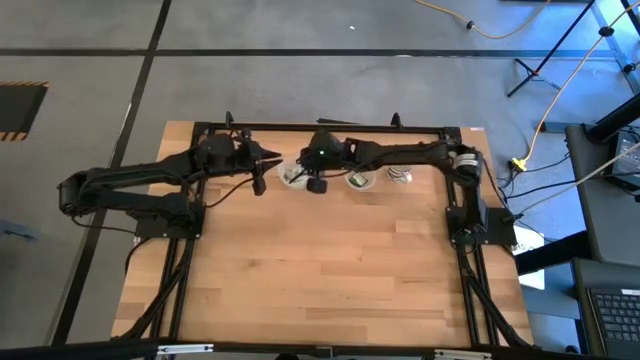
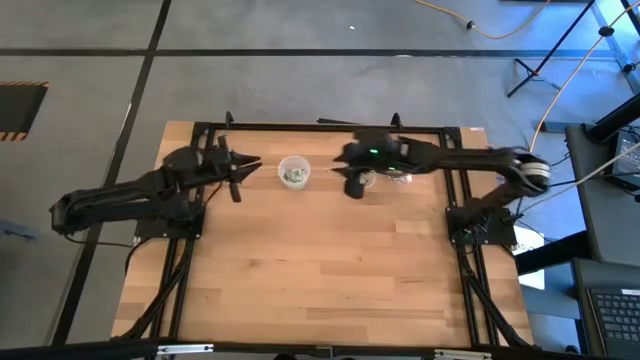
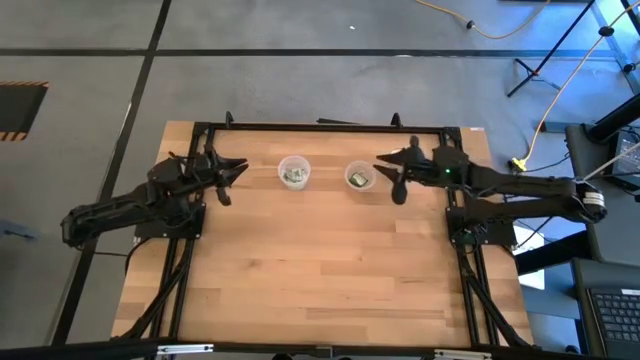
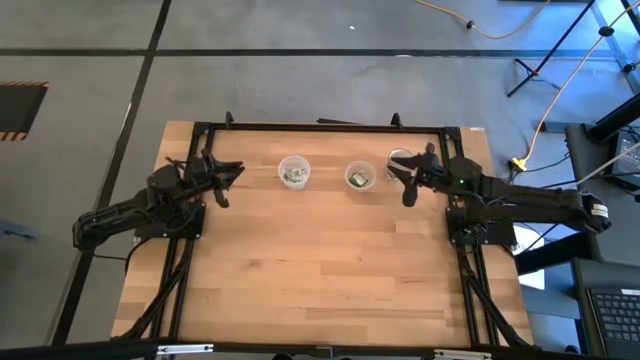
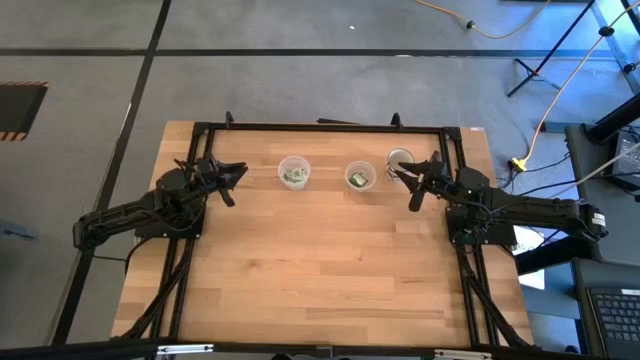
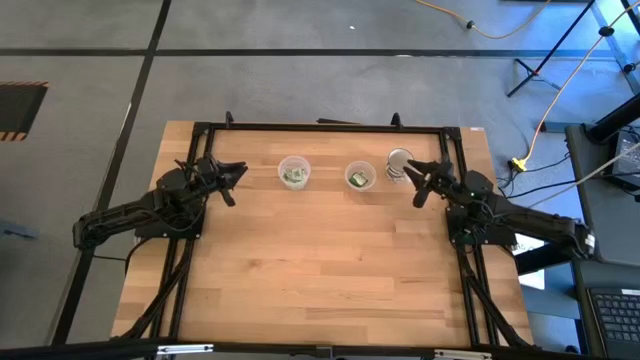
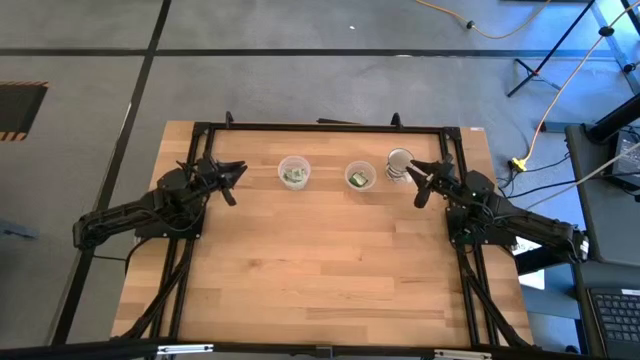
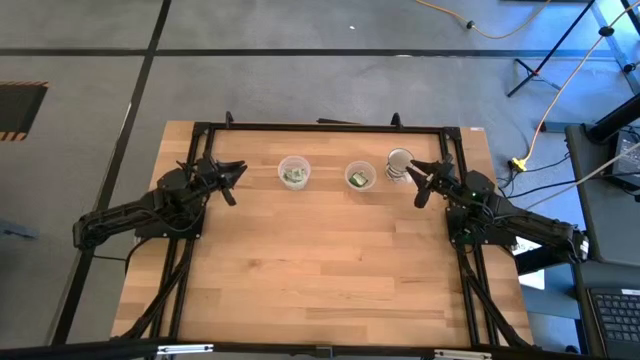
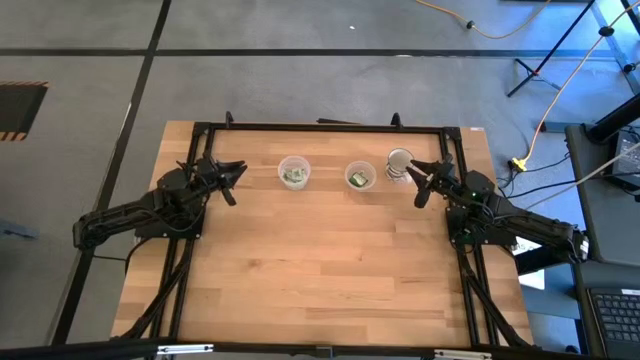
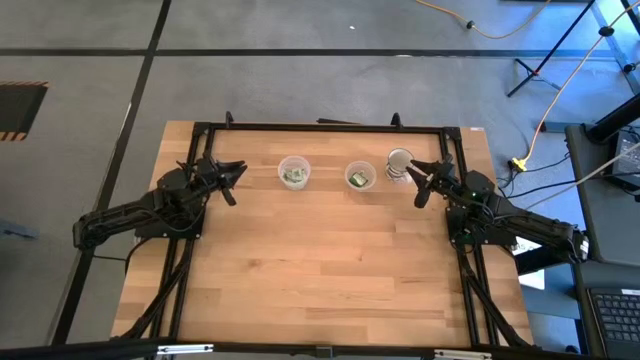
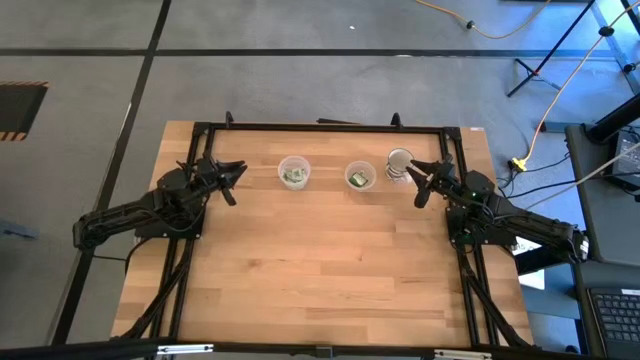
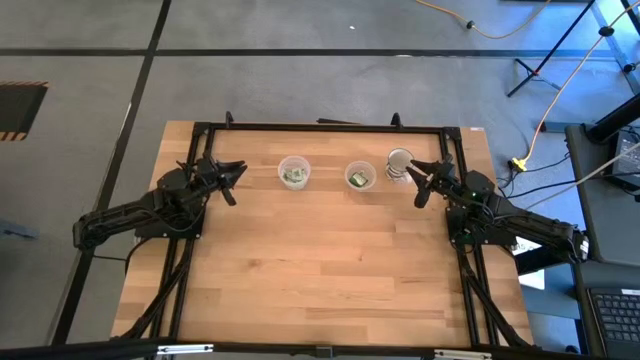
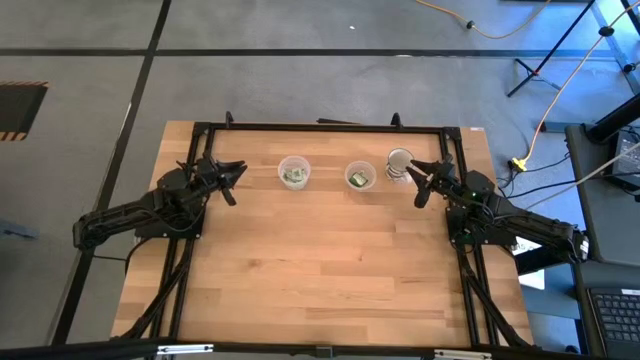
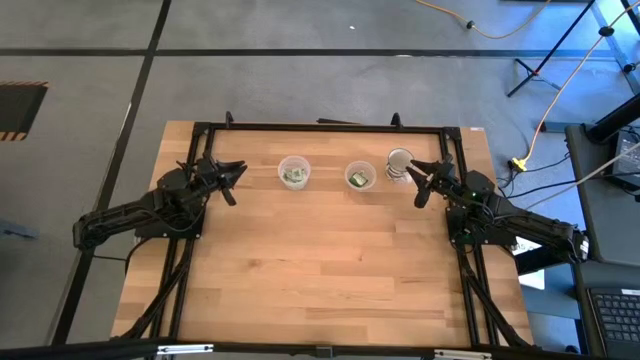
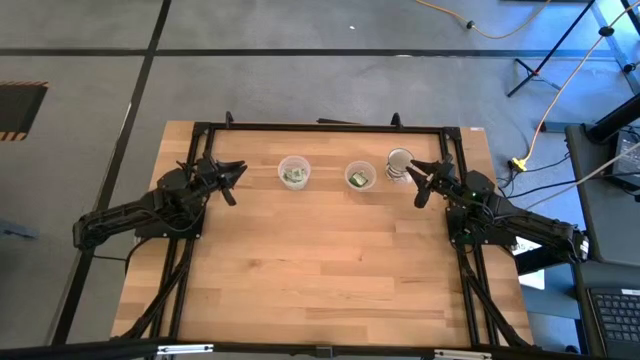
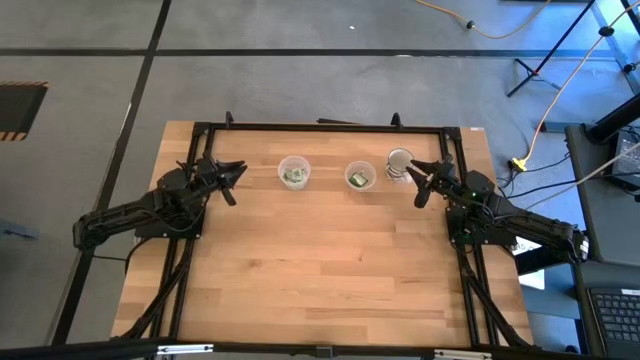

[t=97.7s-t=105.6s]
Task: Pick and place Stevia / Truvia into bins
Return to Home Position

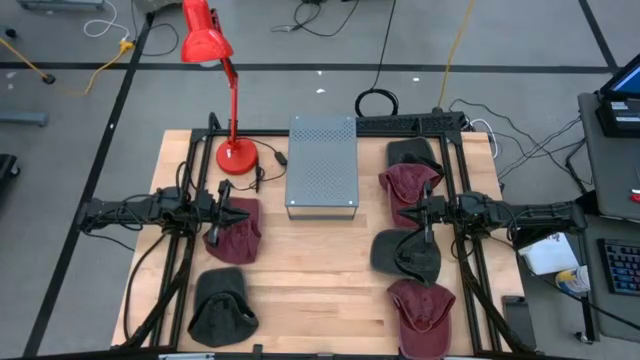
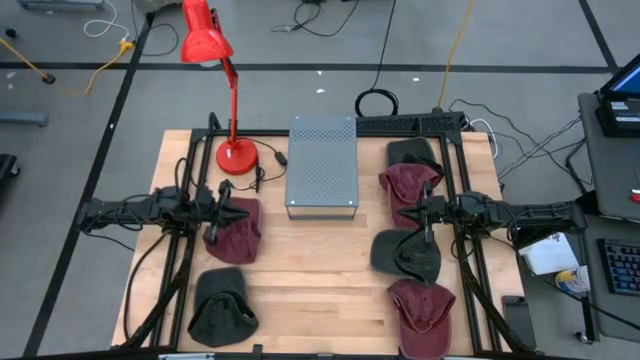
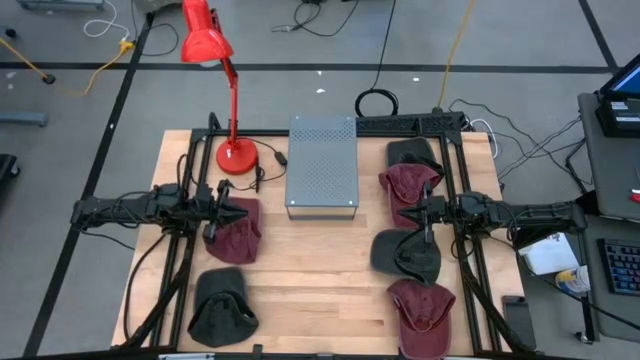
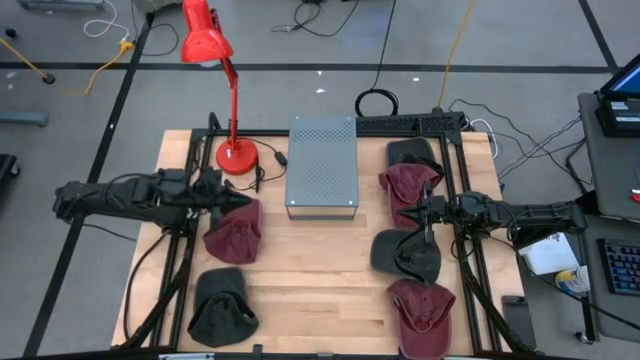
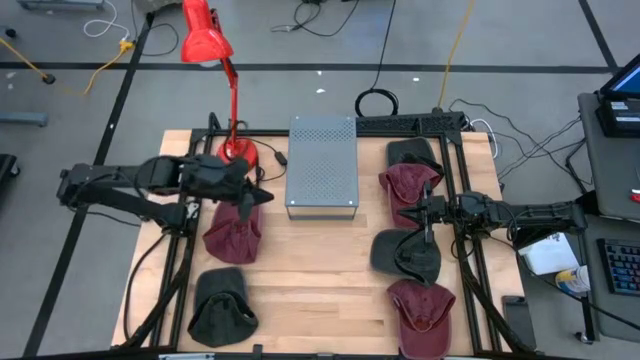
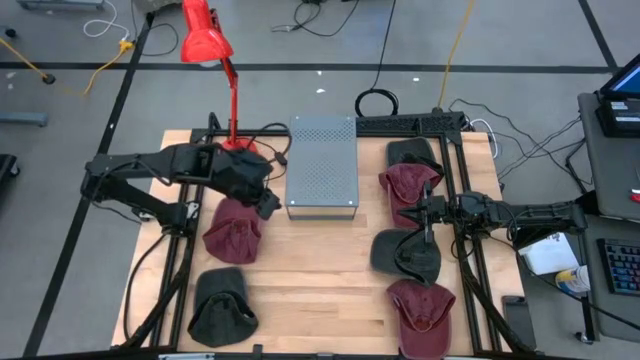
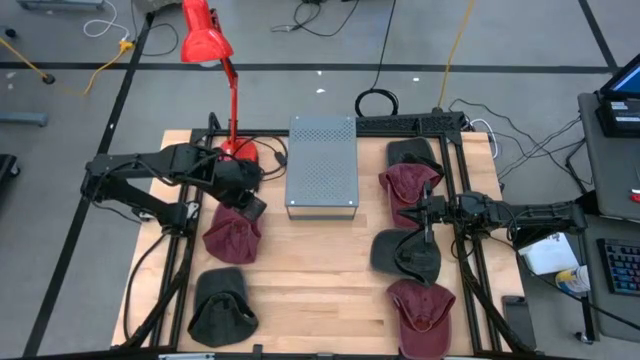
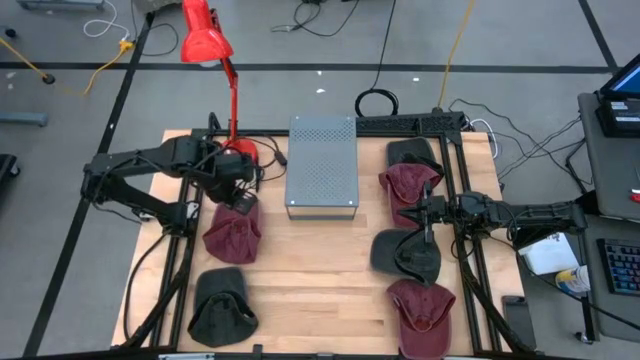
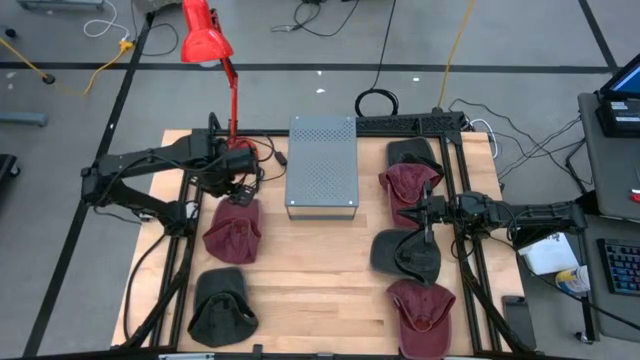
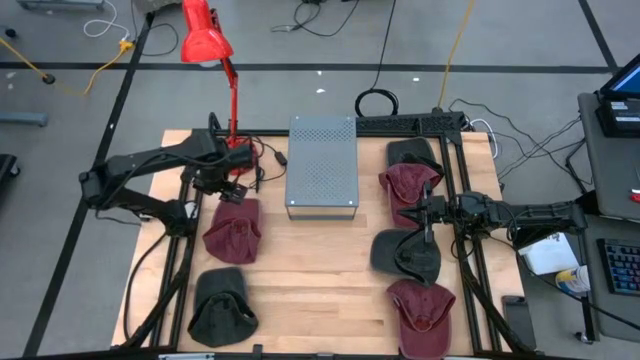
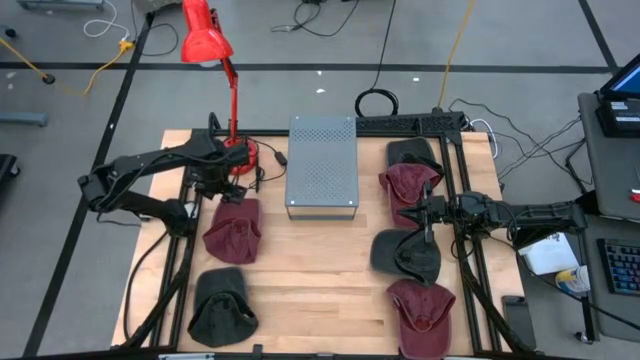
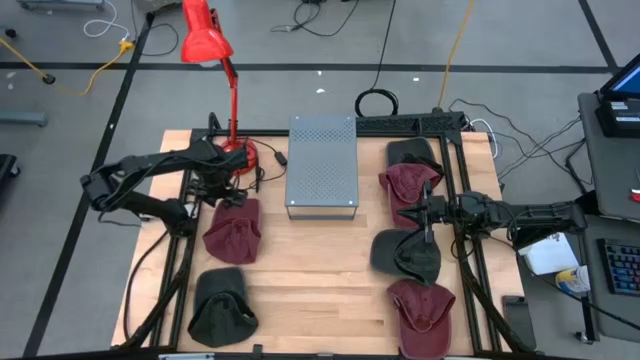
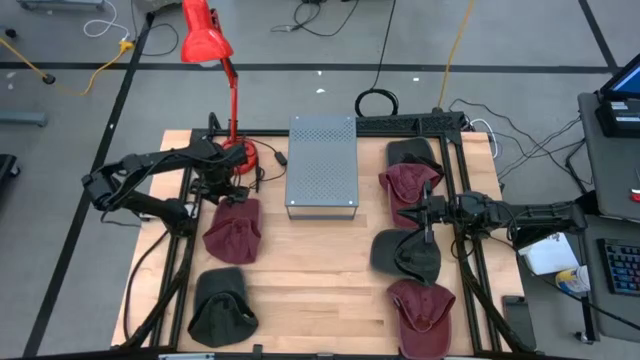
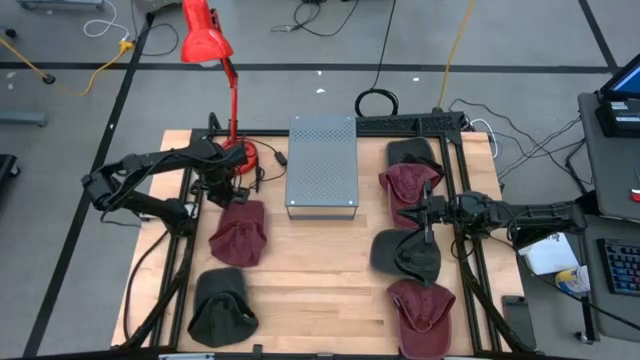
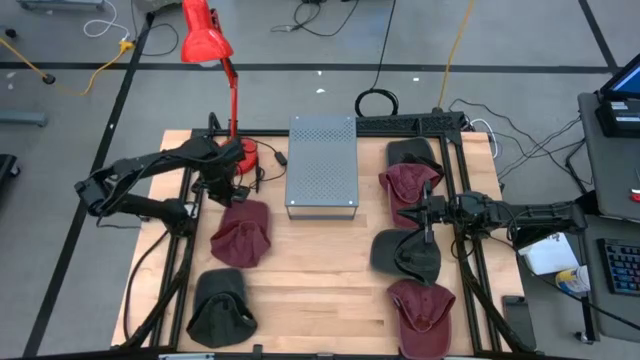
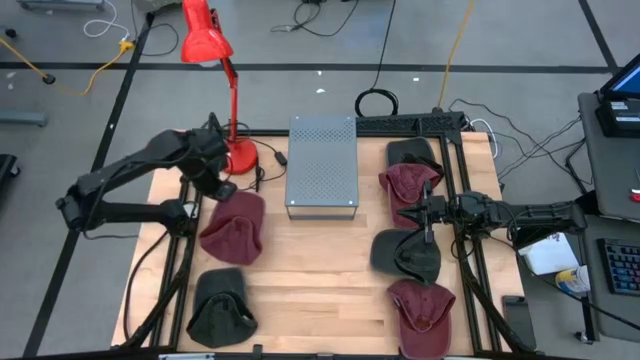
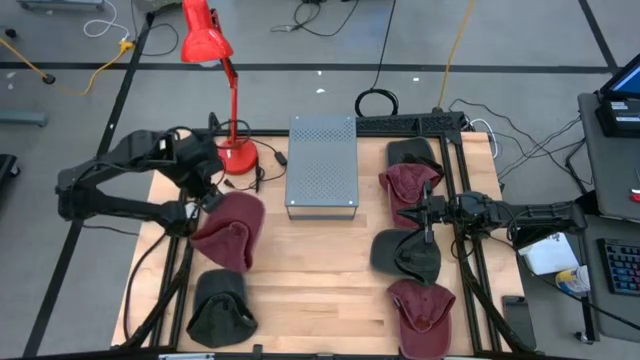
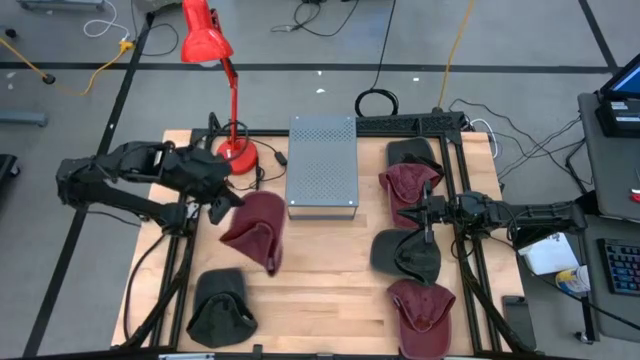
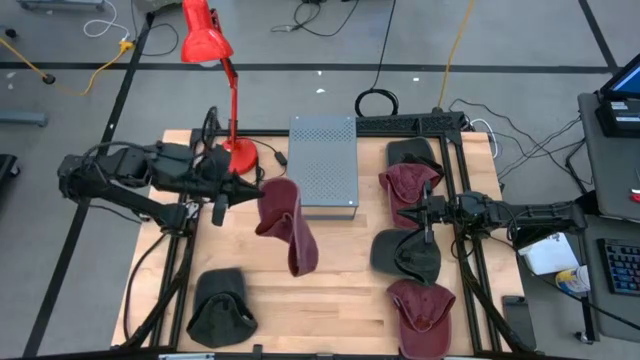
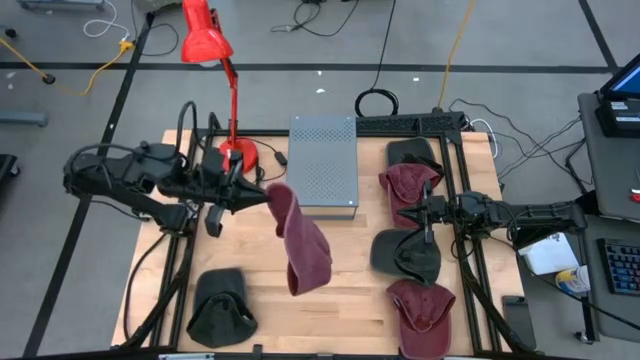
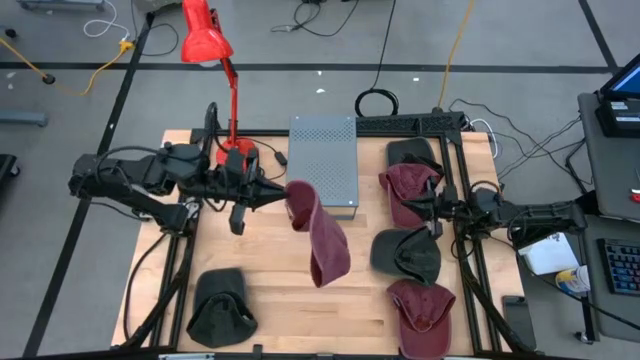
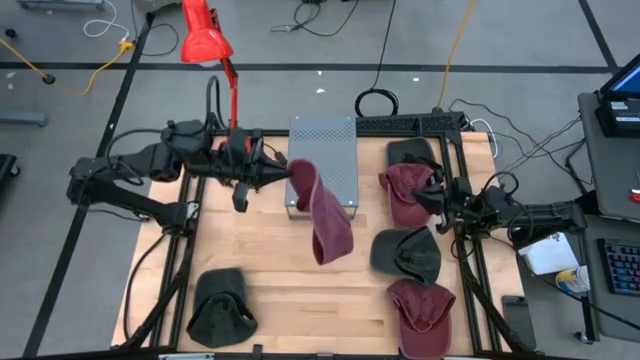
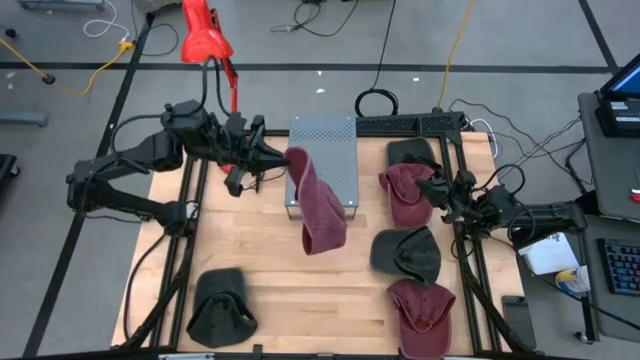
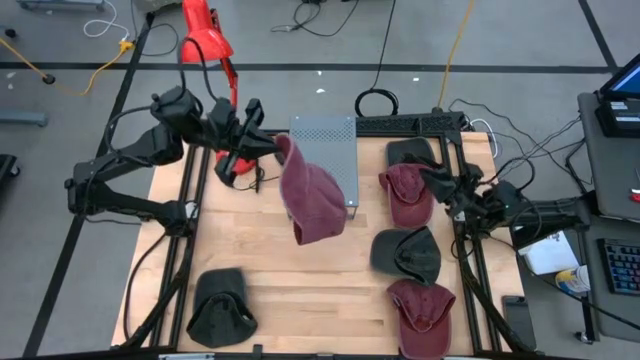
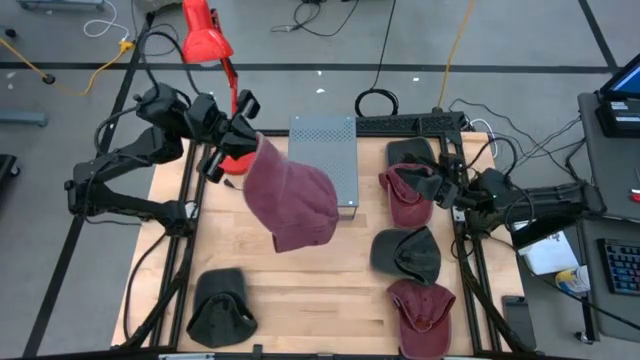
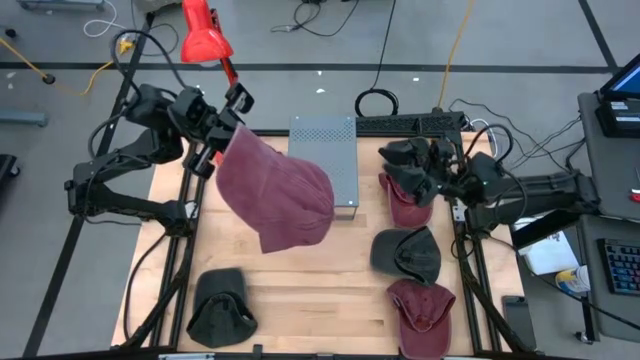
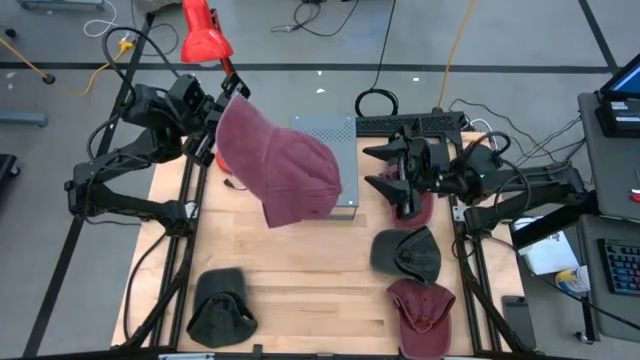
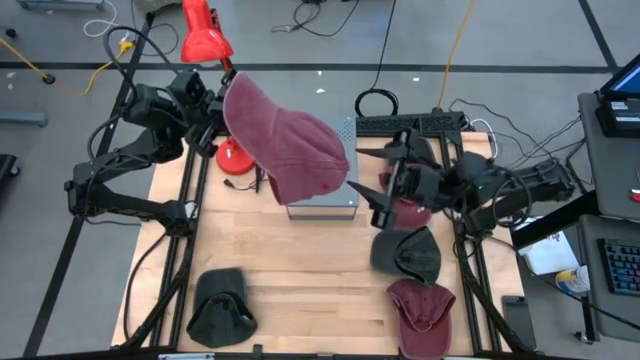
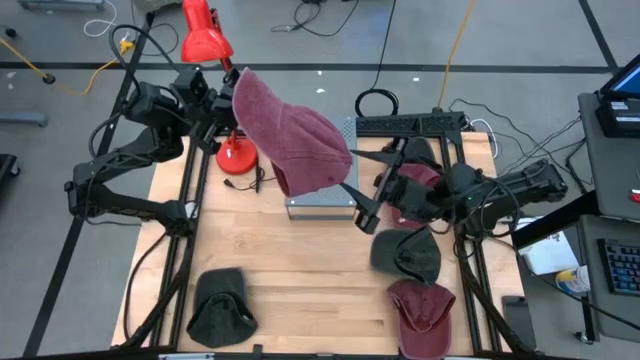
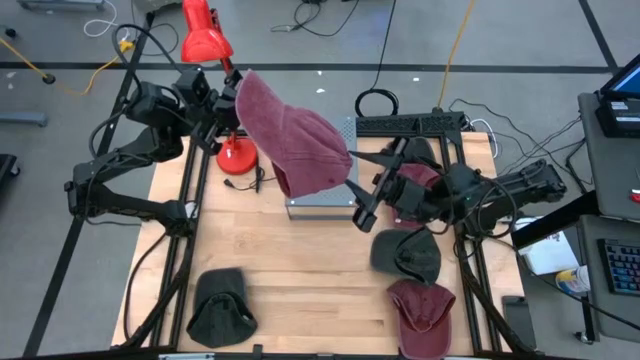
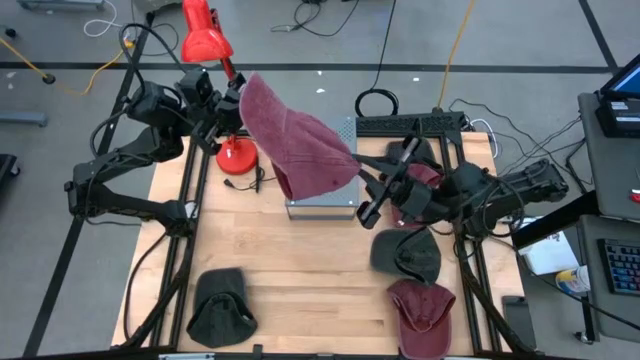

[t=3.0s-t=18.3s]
Task: Pick & Place hat
Put the left red cap on the shelf
